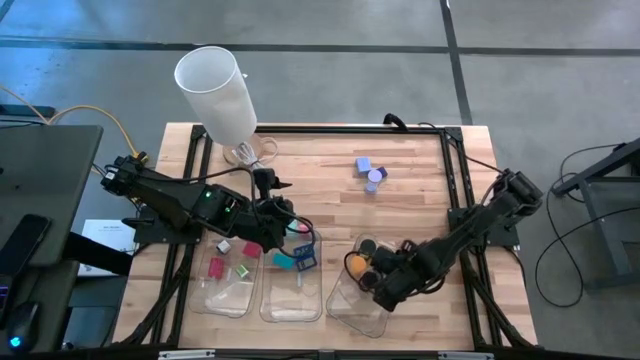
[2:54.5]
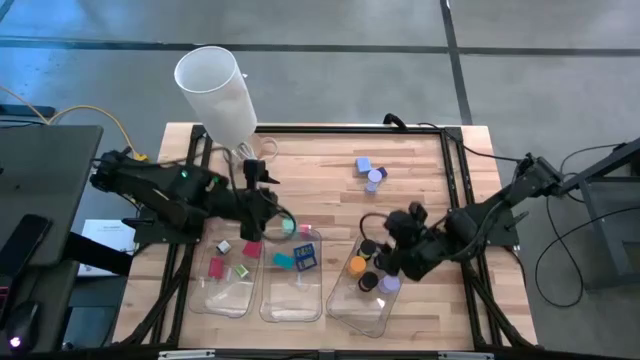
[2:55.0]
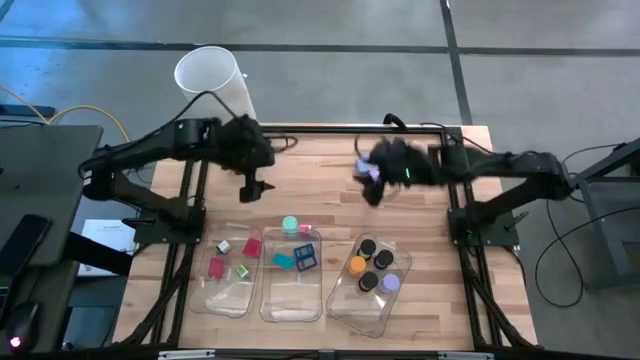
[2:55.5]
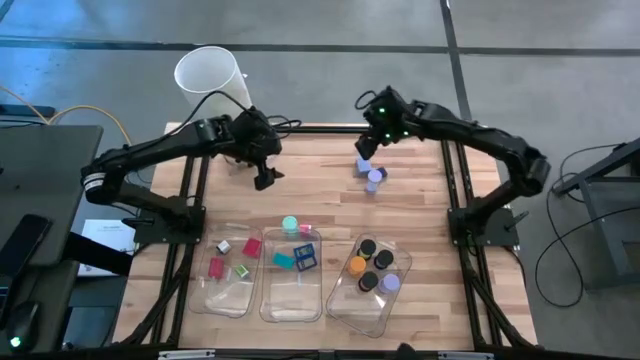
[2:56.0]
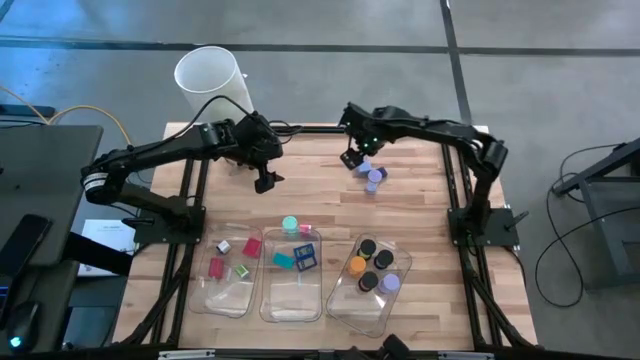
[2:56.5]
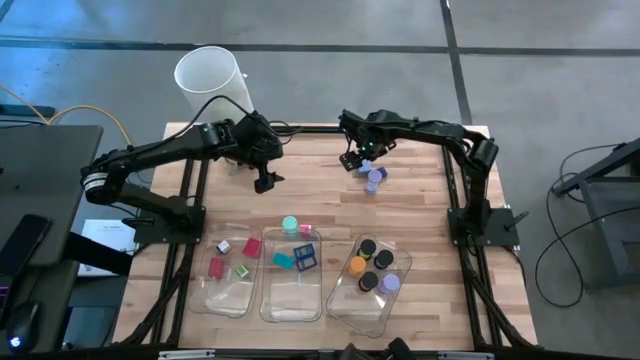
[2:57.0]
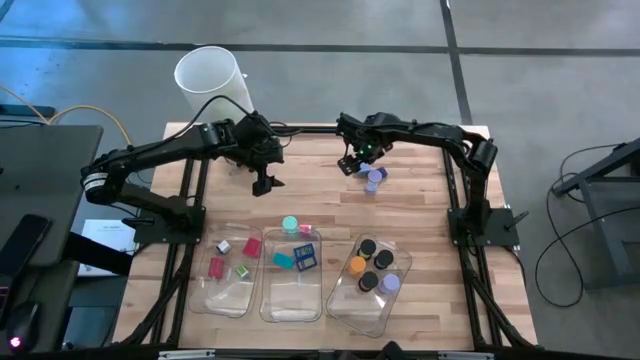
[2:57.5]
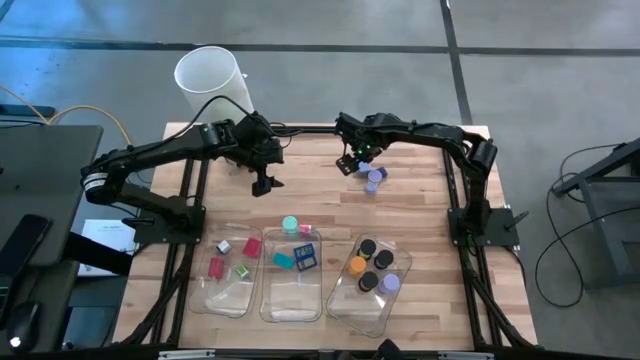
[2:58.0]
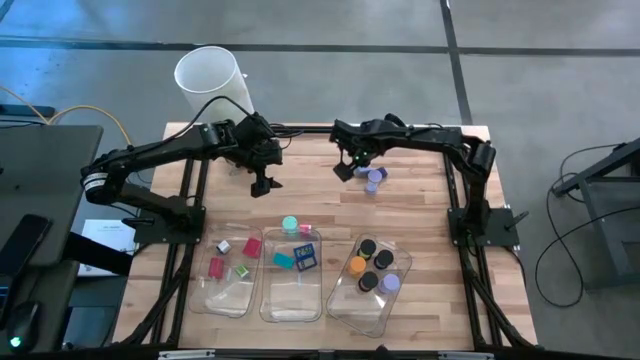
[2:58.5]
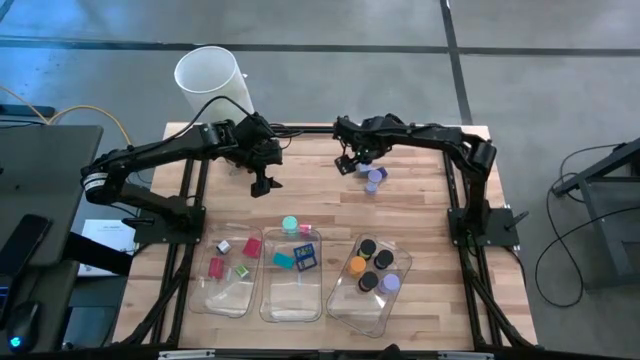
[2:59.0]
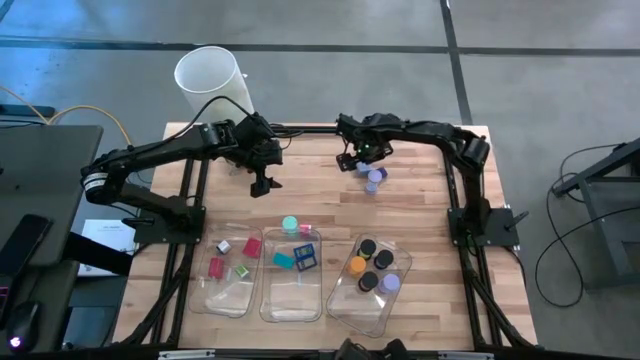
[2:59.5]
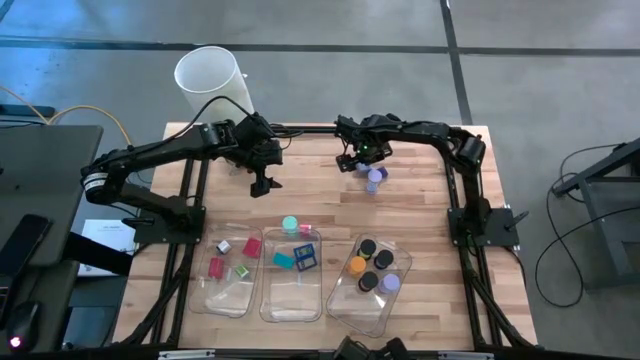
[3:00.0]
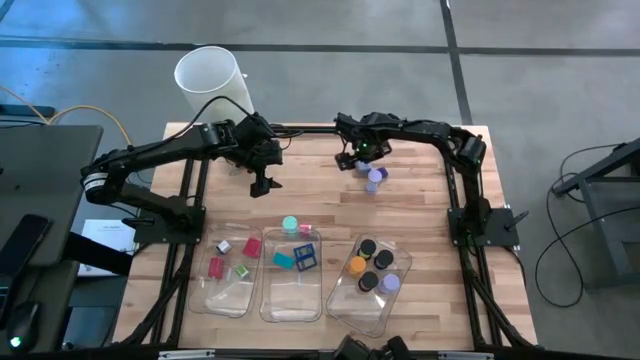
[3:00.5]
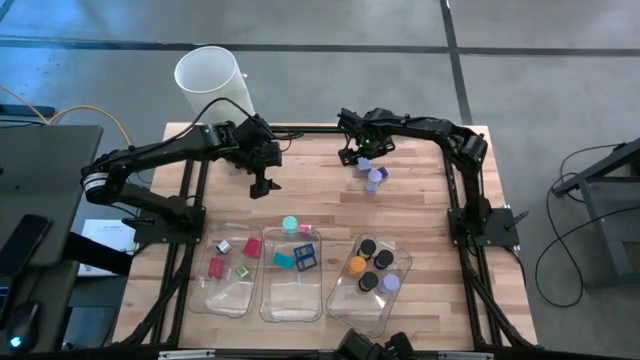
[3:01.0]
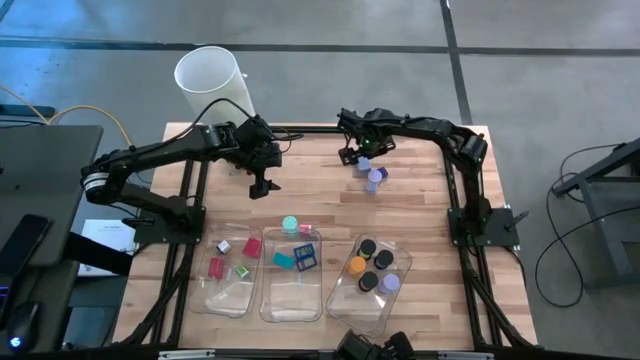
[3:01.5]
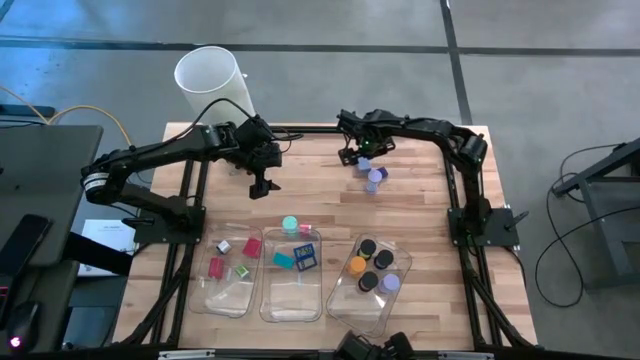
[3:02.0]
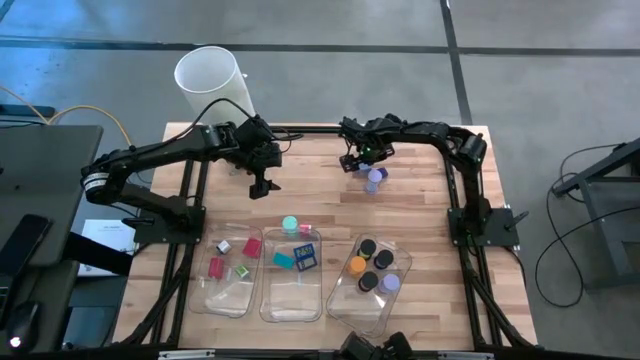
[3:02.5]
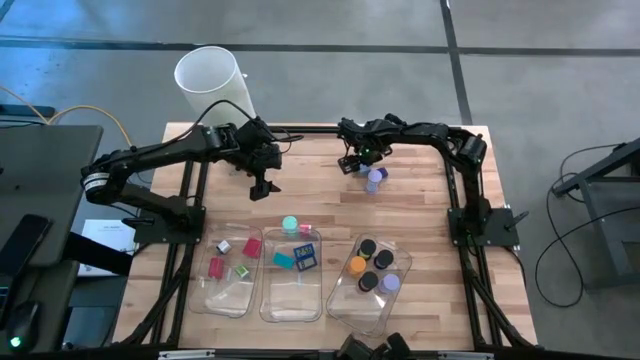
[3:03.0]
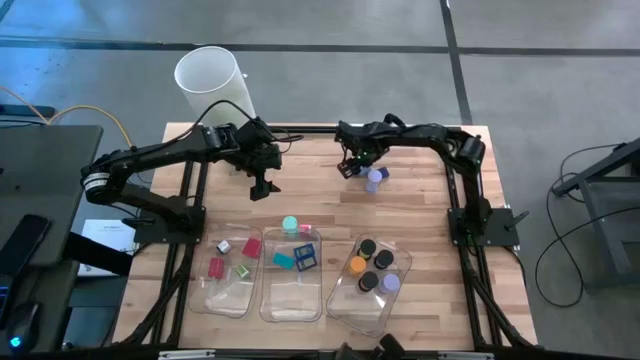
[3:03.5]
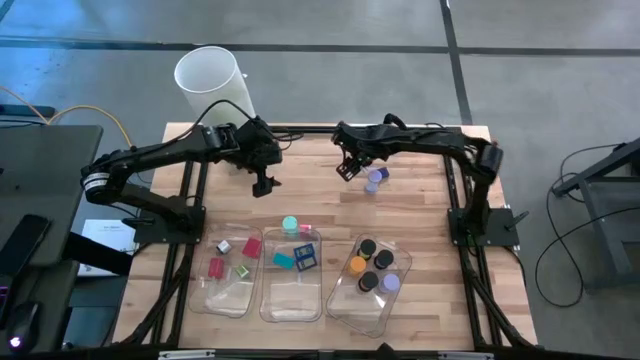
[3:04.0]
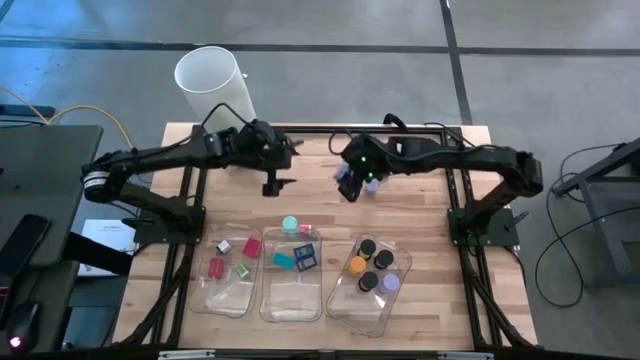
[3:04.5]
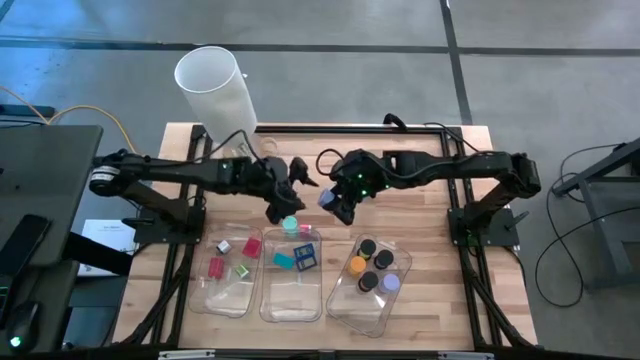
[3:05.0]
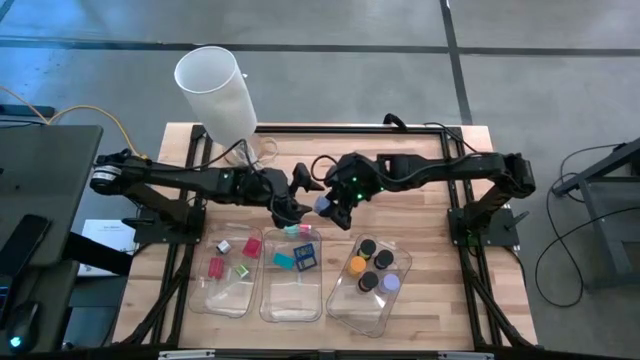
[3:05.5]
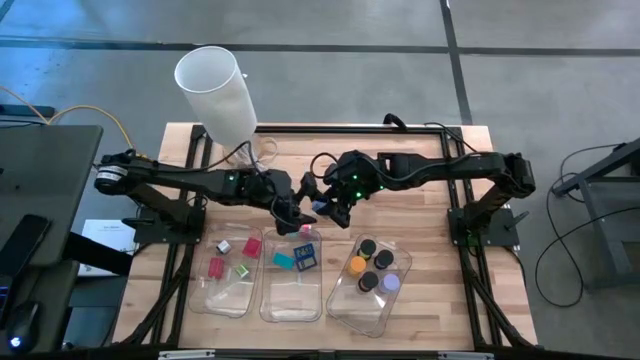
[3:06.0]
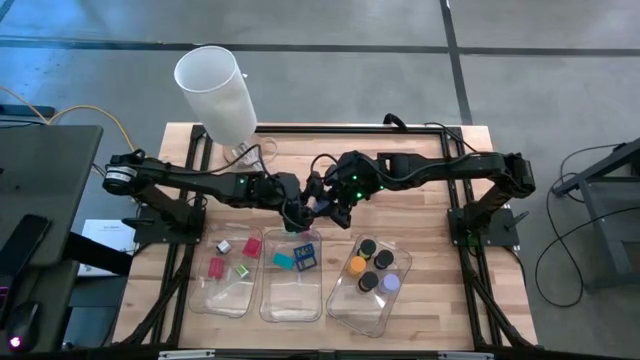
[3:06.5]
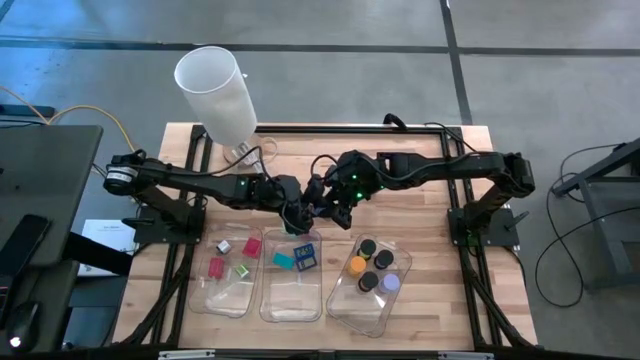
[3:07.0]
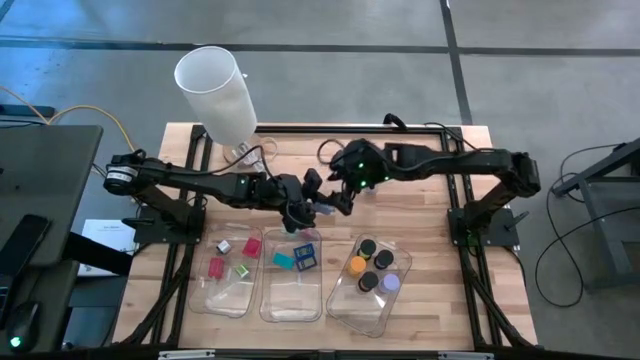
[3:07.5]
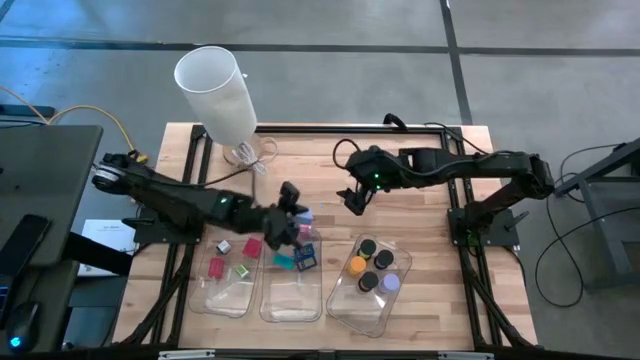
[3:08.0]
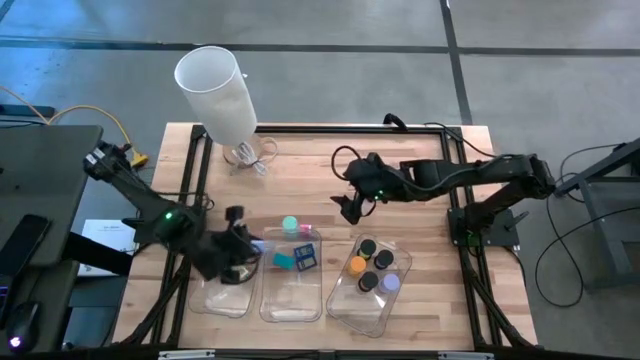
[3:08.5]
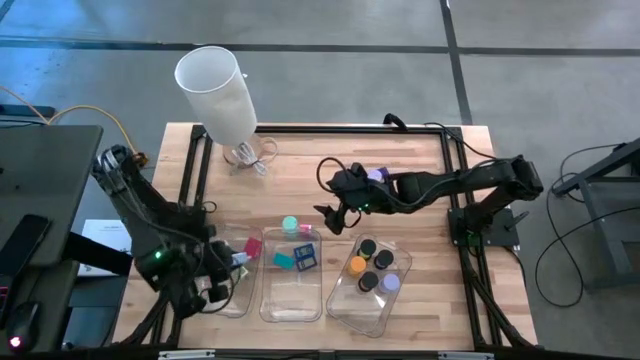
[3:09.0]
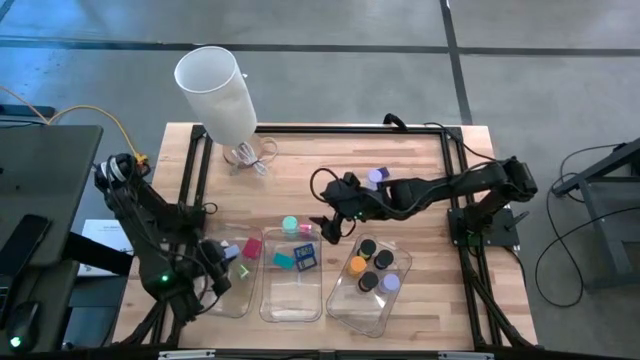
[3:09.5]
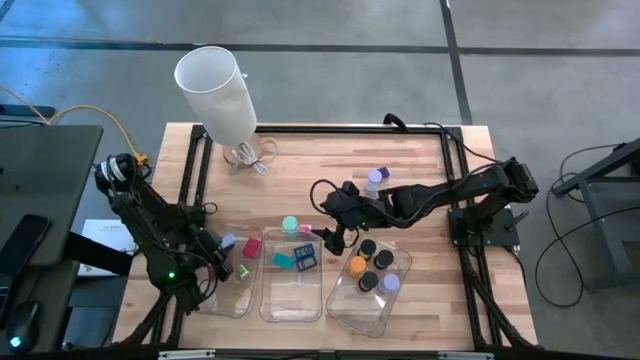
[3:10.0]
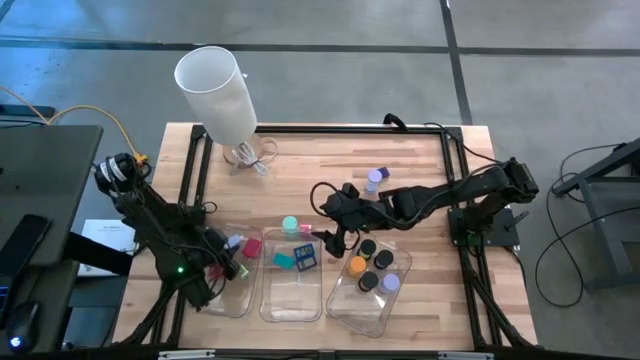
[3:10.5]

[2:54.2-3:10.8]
Task: Pick & Place Office items
Put the purple adapter into the left bin

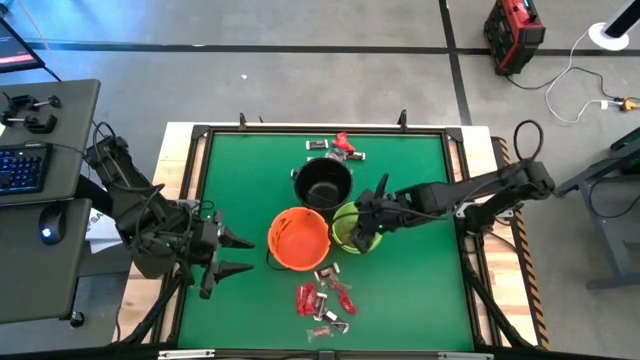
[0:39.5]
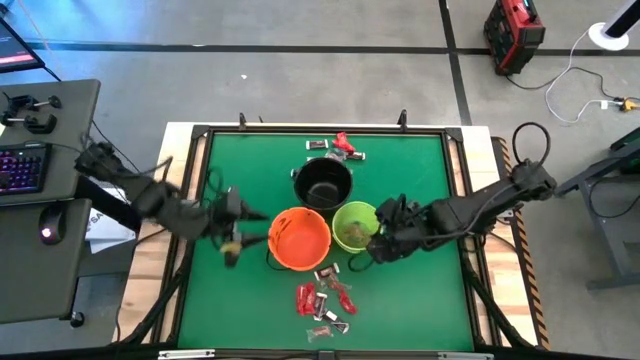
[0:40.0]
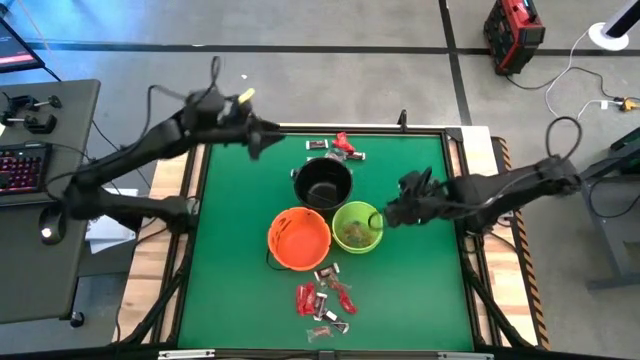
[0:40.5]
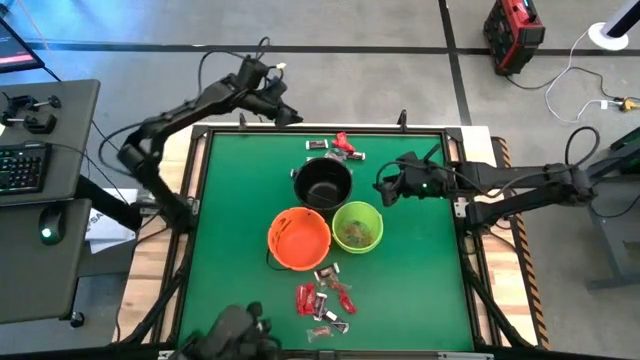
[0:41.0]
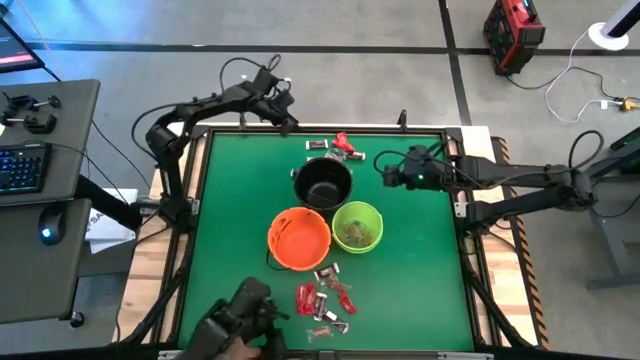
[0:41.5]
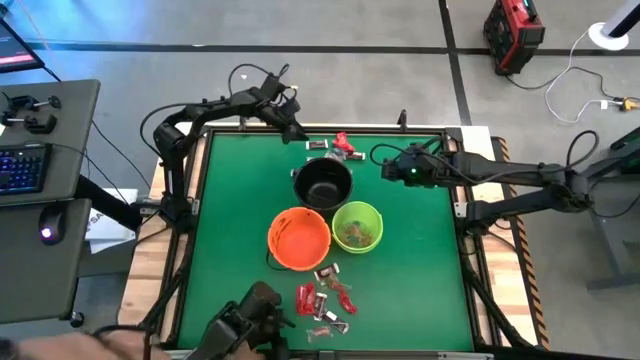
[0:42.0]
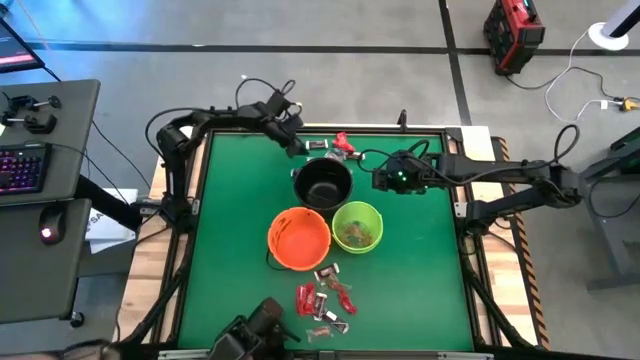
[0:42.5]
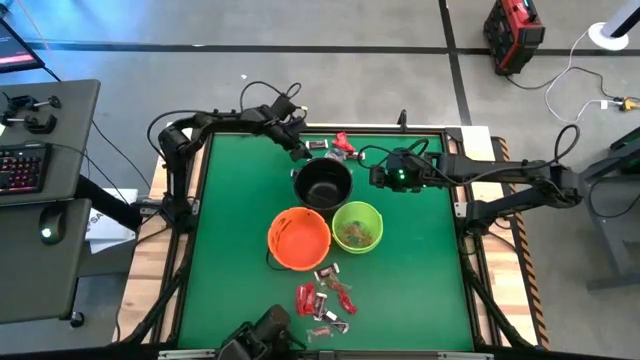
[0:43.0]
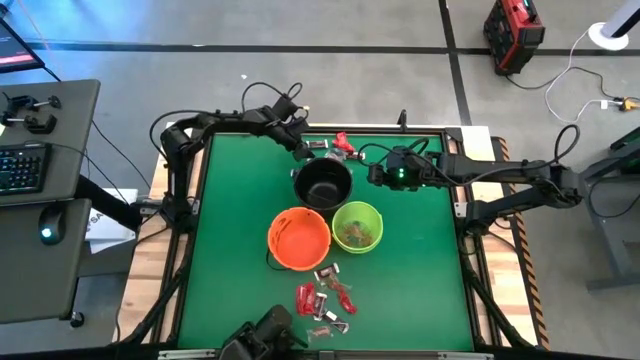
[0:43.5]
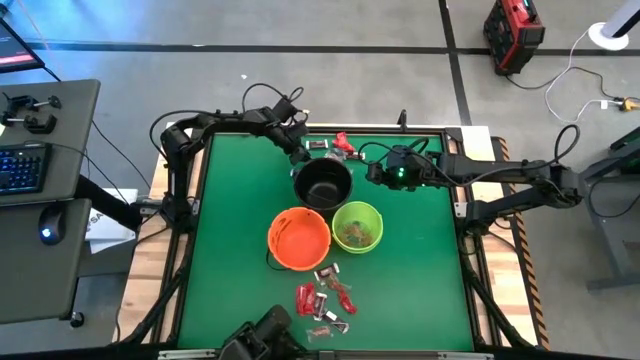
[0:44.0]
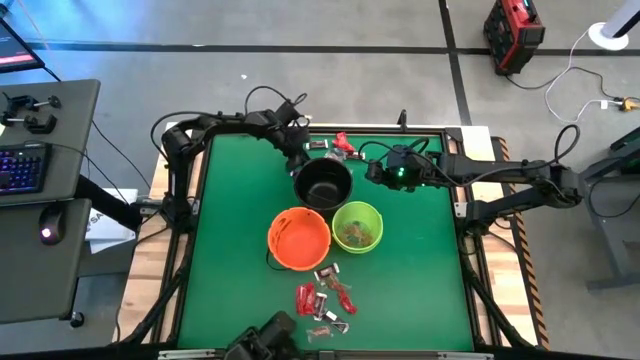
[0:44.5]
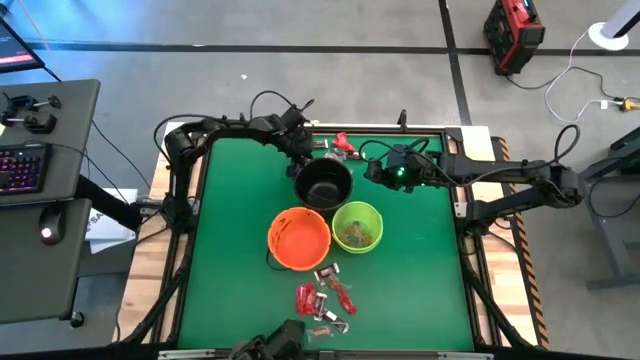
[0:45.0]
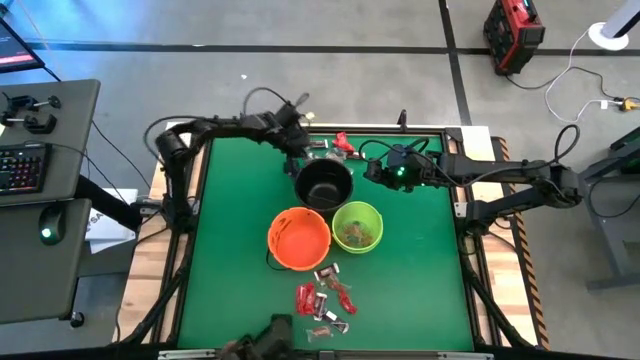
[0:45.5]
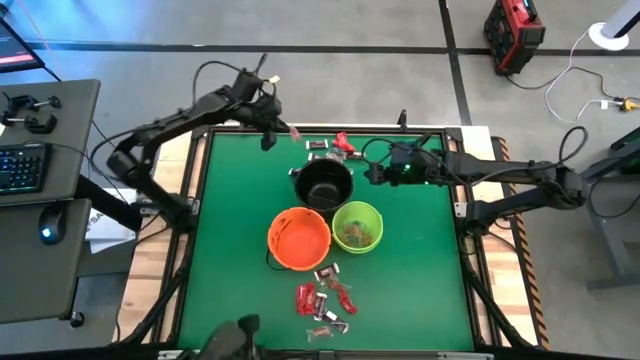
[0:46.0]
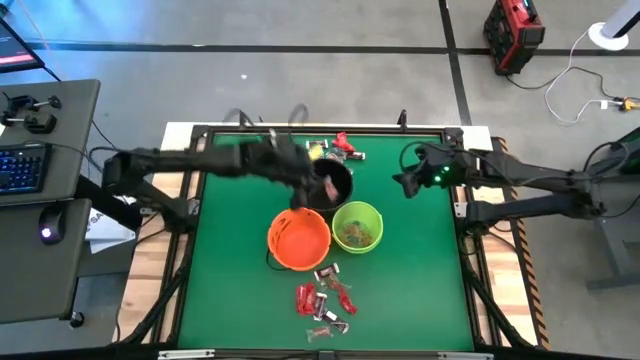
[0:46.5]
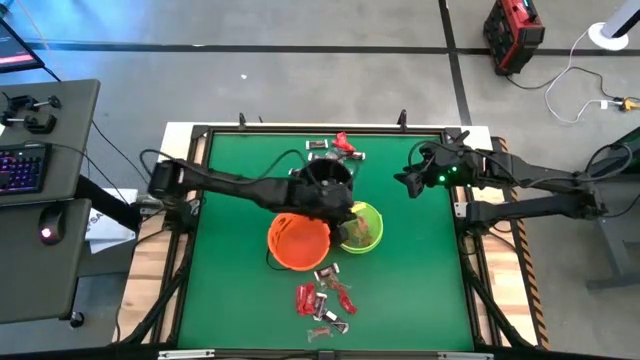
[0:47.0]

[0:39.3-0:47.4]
Task: Sort candy by brand, put in halloween buckets
Put the orange gummy into the green bucket
